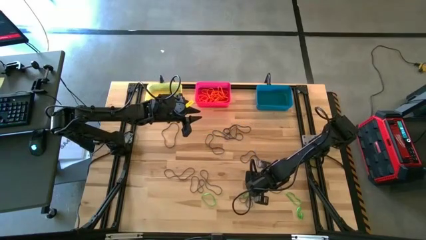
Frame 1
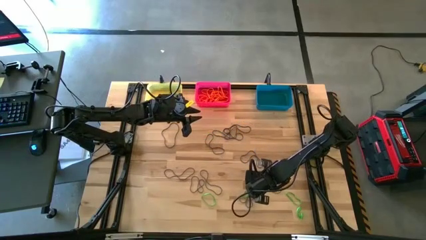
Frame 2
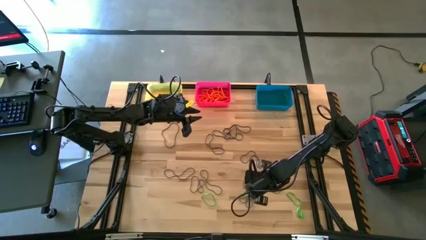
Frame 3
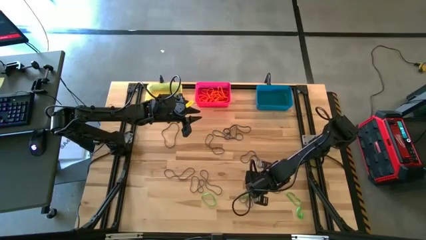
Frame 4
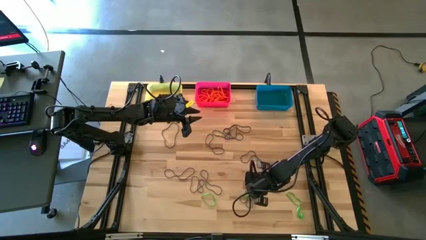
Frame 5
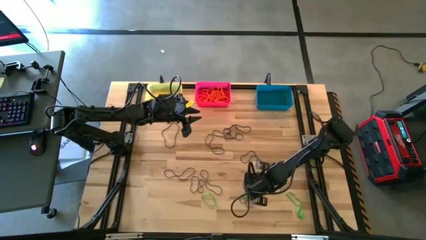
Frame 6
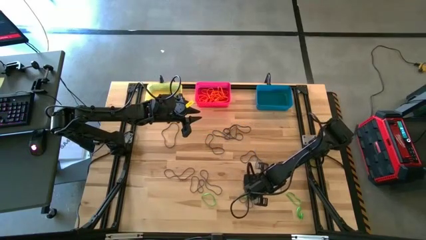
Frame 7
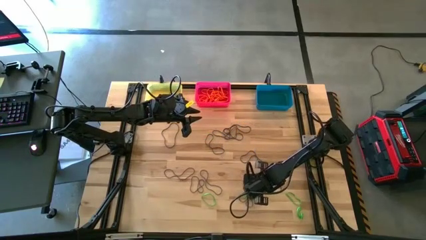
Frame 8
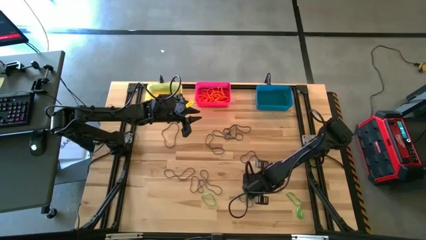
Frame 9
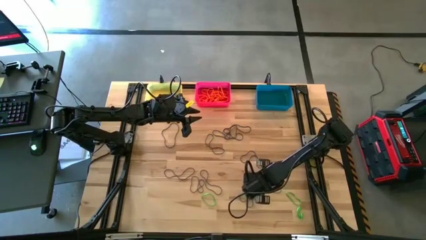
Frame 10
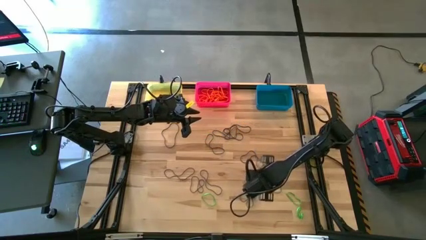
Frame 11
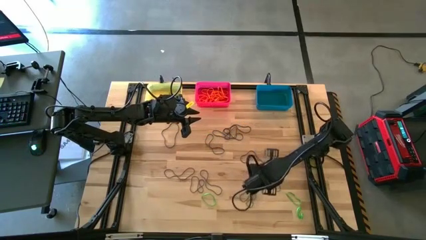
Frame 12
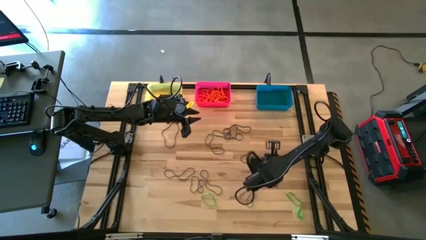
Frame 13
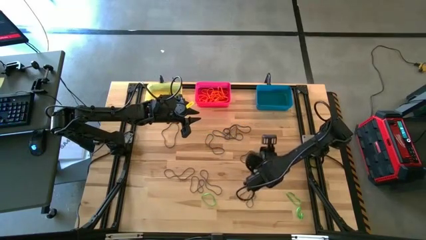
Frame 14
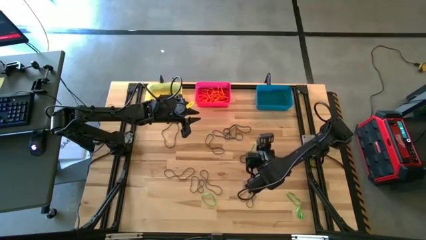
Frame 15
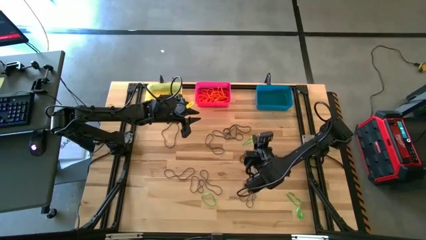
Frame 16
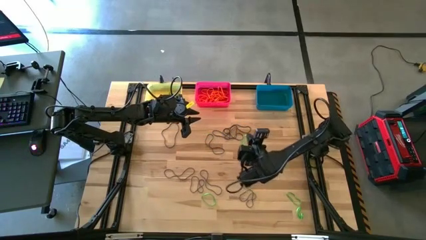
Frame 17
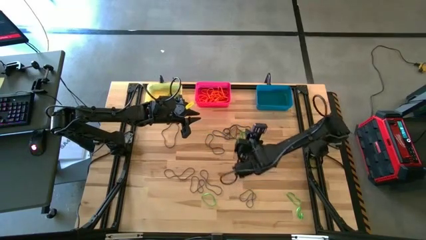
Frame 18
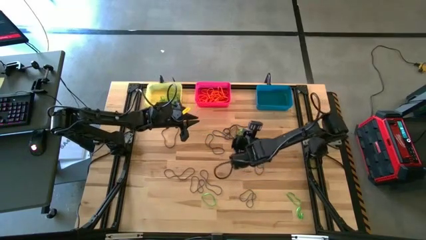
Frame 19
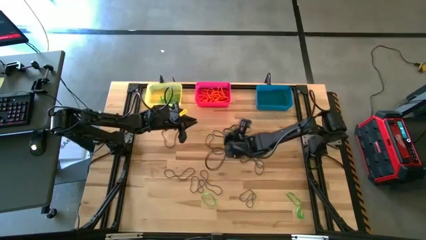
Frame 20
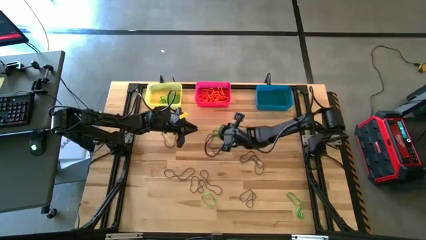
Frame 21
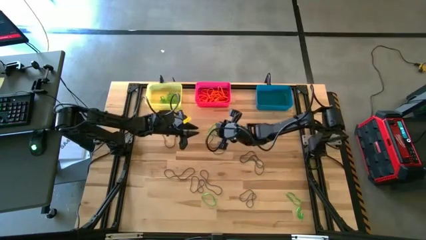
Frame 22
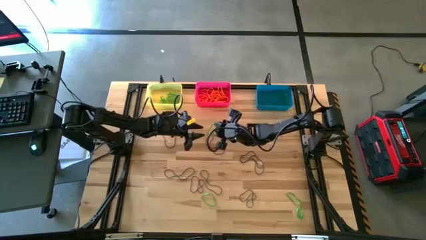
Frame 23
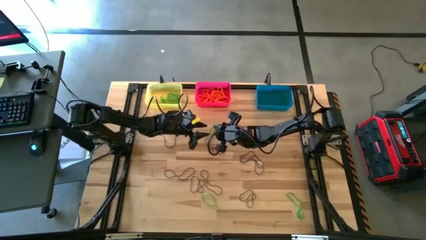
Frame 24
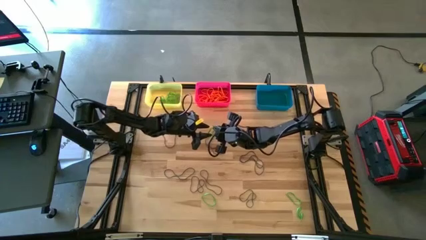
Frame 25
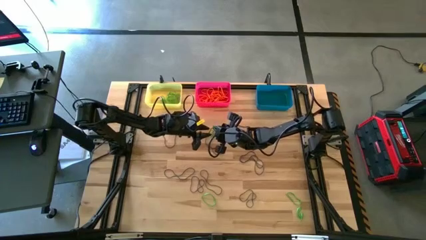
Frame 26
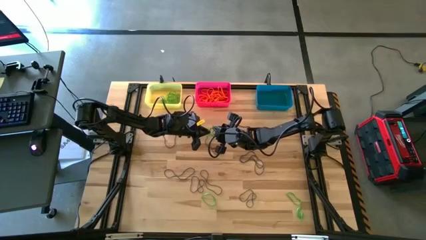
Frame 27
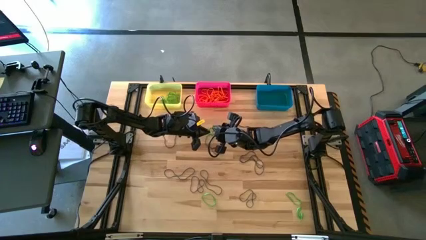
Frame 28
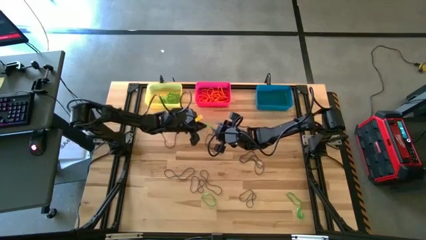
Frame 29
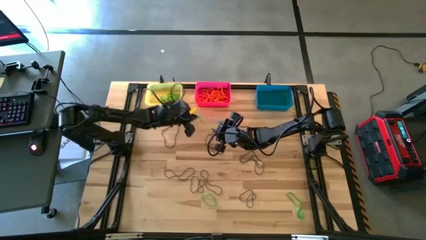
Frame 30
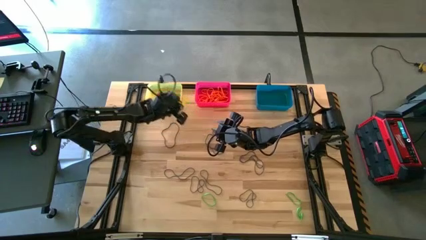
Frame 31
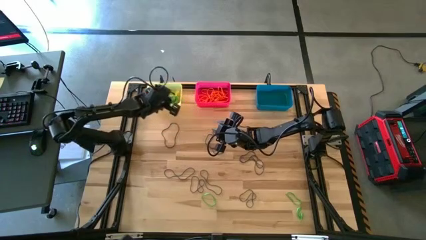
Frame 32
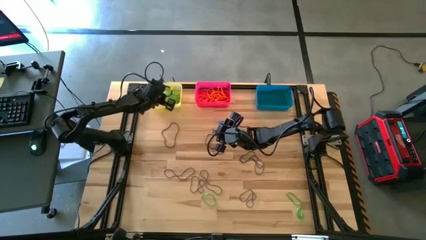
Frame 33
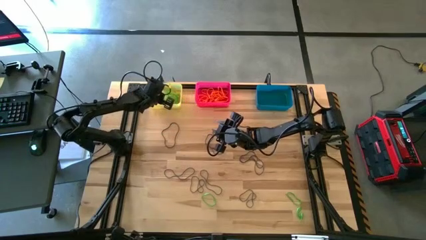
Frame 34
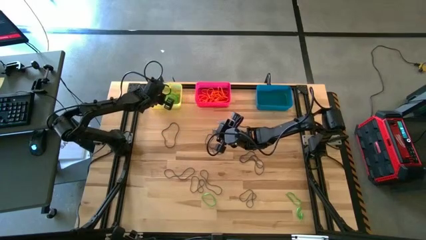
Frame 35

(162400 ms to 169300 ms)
Task: Sort rubber bands into baskets
Put the green rubber band into the yellow bin

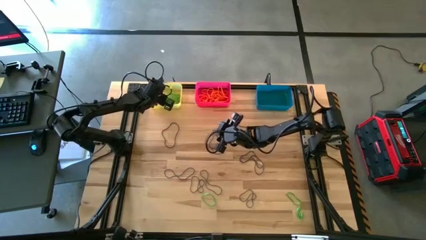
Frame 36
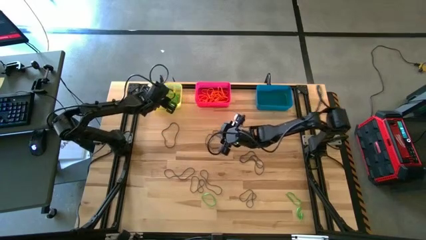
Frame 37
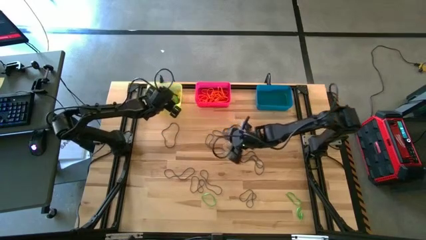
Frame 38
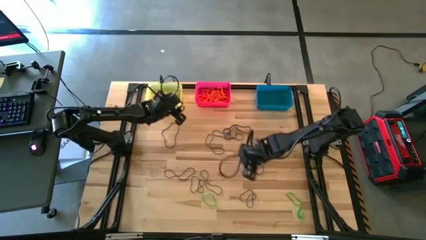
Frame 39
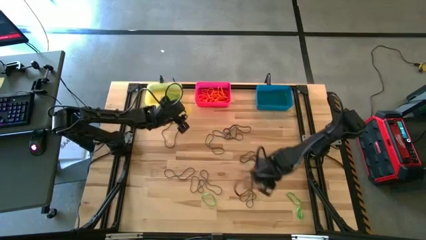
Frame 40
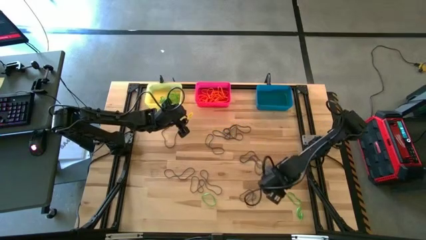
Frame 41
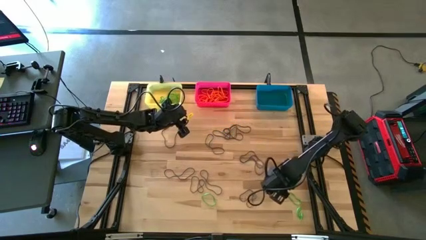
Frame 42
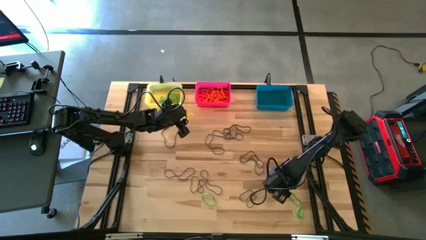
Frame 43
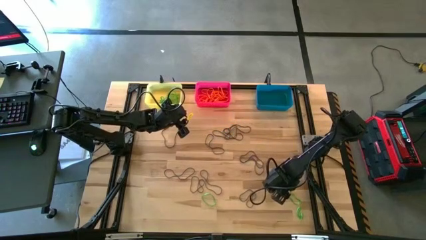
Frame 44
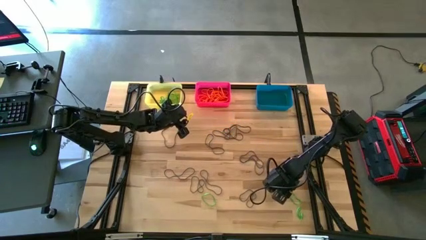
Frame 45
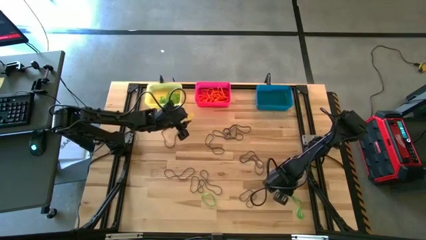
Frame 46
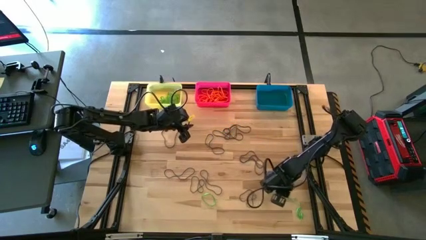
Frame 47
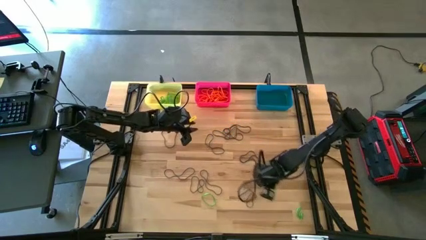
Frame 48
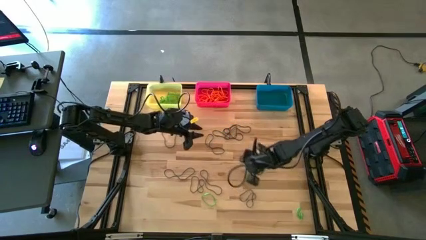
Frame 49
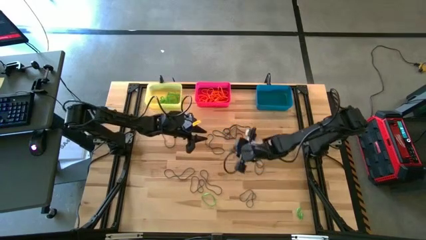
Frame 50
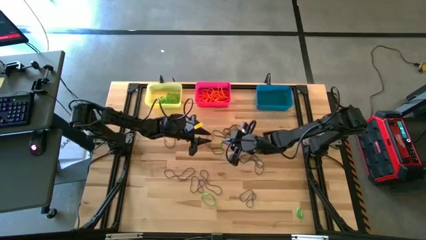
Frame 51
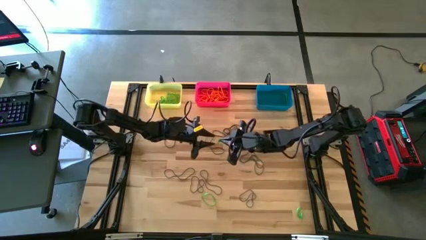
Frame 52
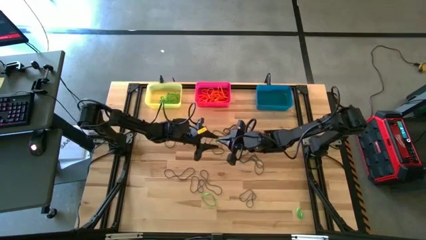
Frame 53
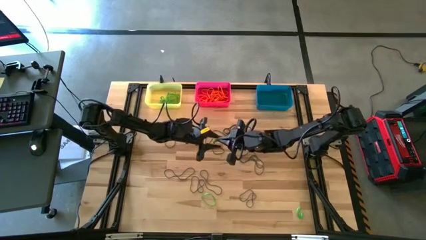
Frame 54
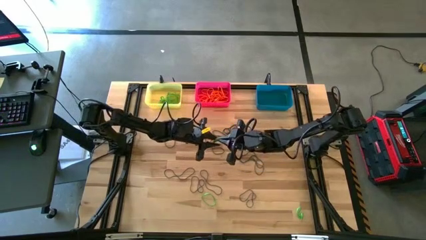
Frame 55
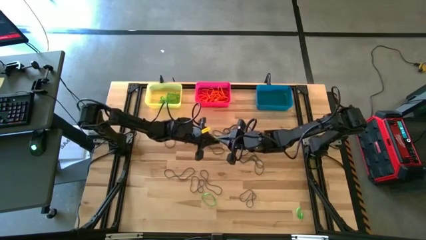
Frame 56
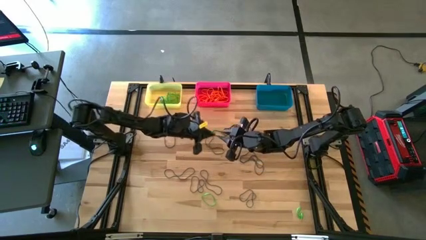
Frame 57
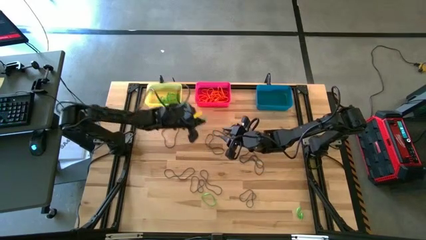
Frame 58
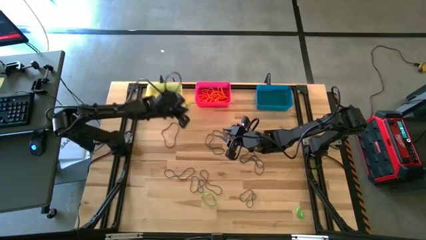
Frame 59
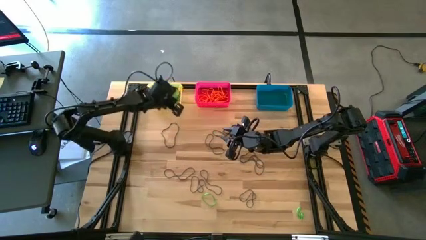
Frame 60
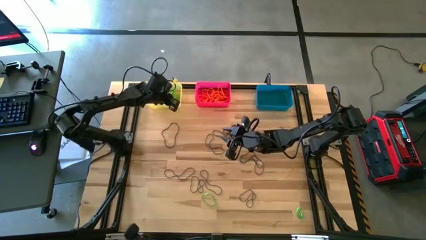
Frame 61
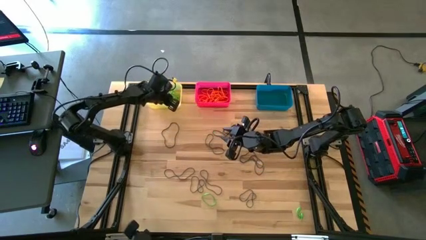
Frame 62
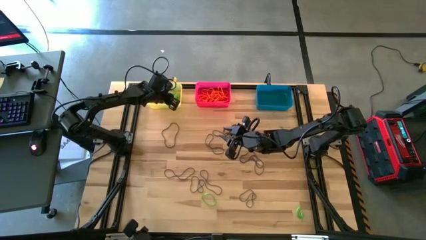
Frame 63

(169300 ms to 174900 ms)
Put the green rubber band into the yellow bin

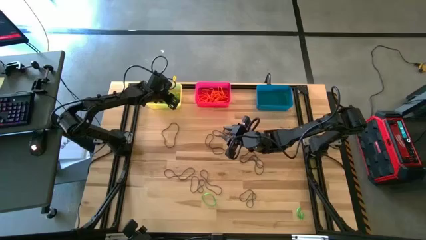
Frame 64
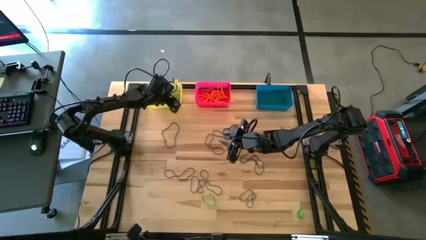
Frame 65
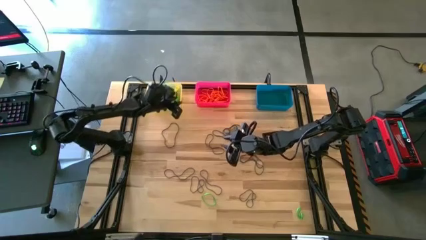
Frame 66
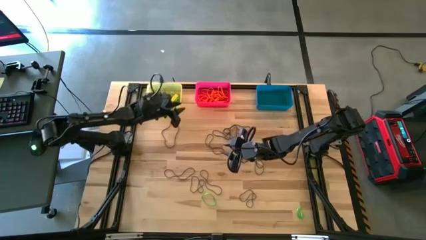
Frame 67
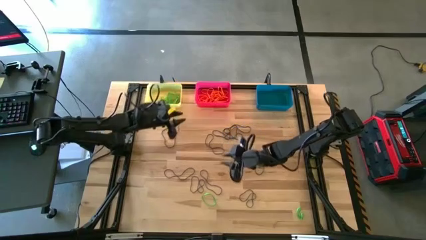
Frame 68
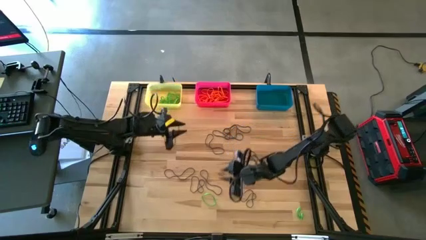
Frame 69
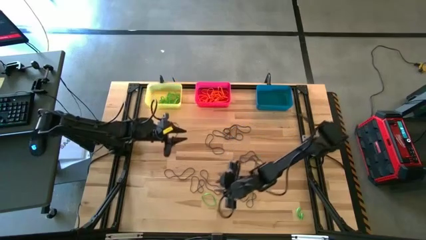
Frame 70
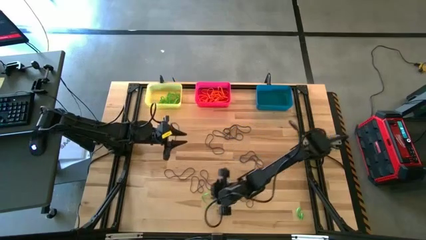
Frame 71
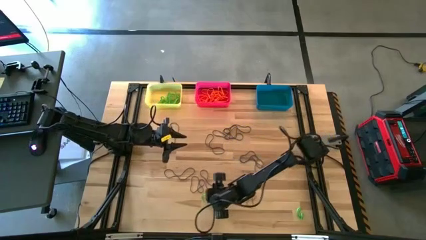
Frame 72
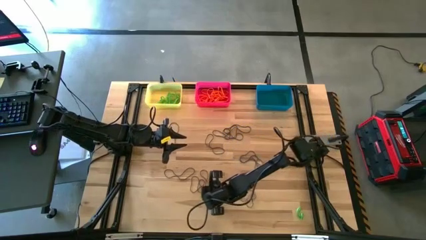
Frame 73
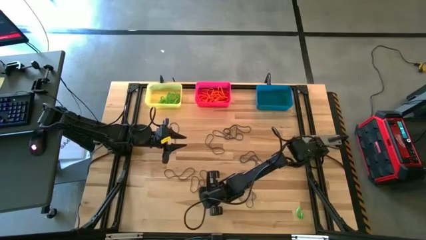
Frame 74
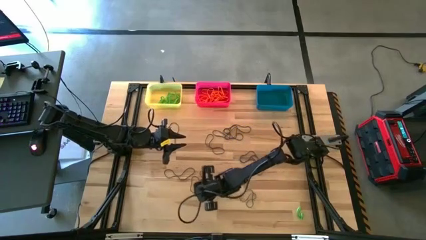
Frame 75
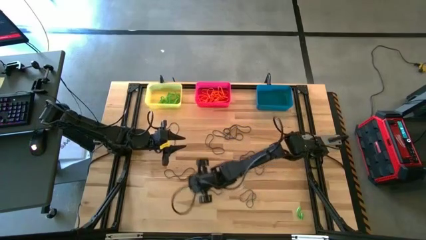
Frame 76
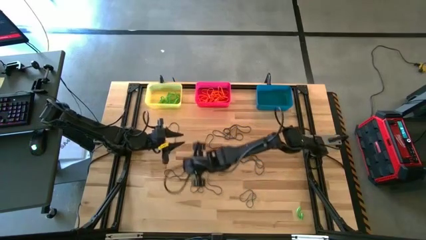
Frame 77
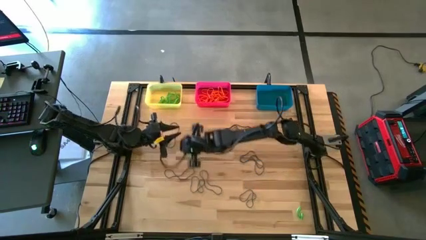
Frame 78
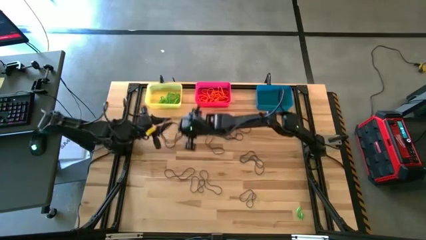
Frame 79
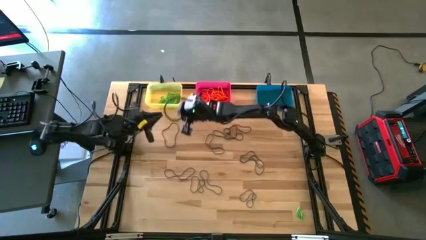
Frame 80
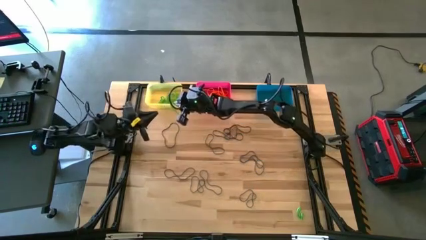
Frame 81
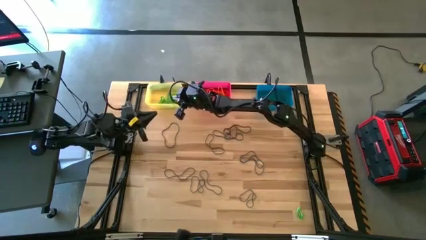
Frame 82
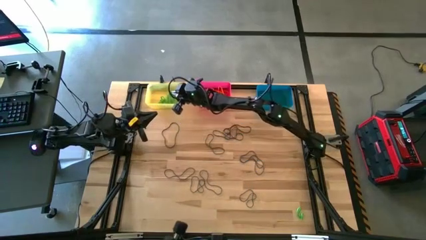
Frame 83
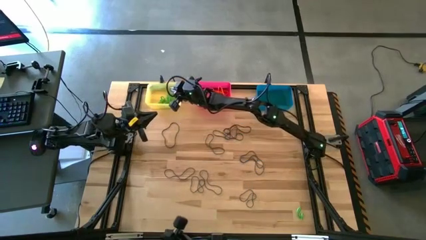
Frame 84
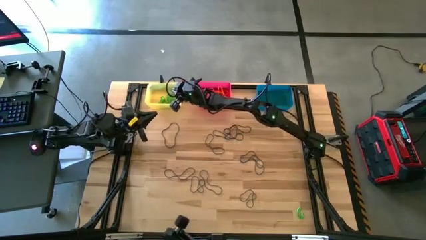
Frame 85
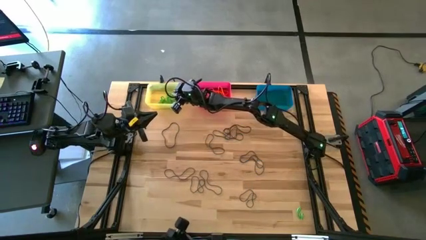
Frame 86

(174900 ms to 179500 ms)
Put the green rubber band into the yellow bin
